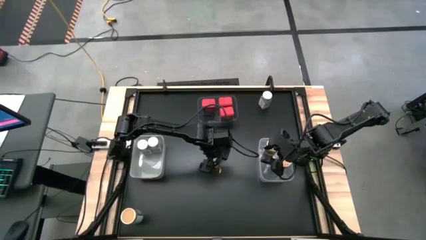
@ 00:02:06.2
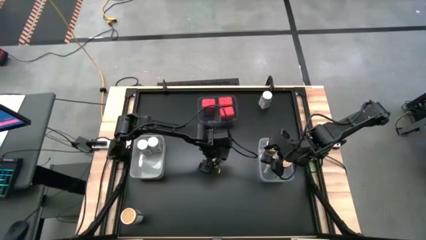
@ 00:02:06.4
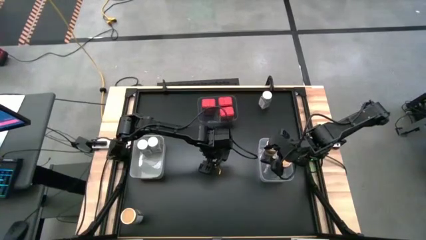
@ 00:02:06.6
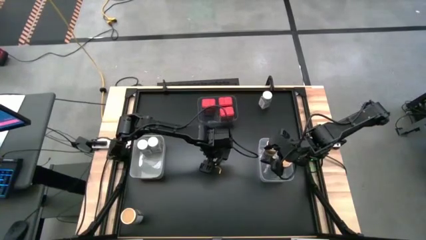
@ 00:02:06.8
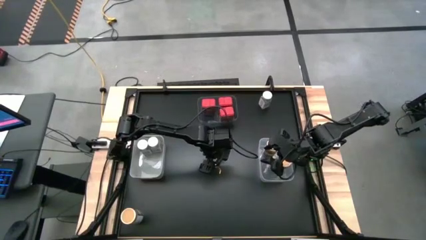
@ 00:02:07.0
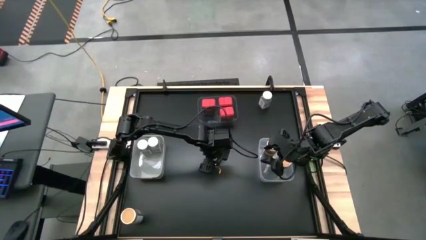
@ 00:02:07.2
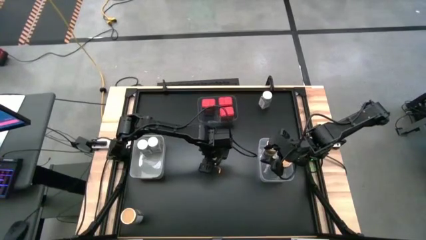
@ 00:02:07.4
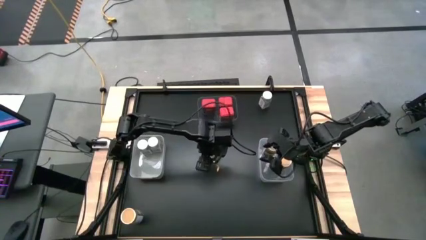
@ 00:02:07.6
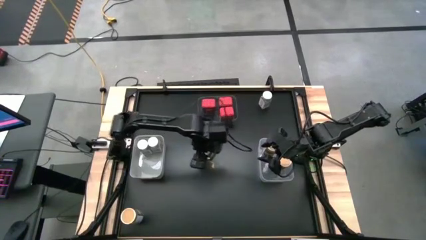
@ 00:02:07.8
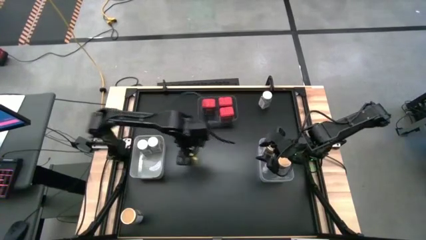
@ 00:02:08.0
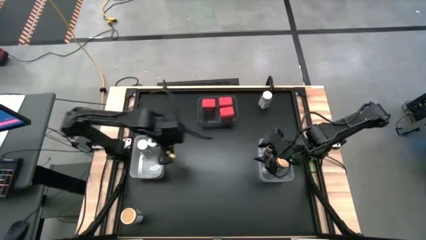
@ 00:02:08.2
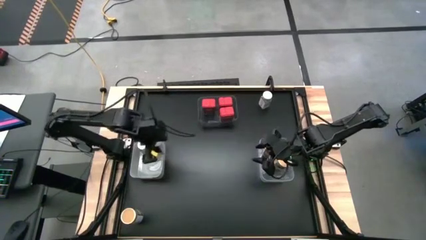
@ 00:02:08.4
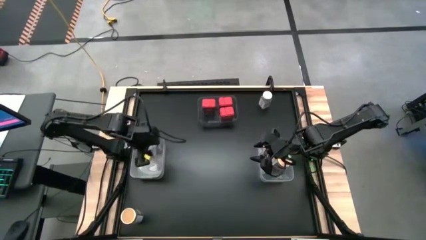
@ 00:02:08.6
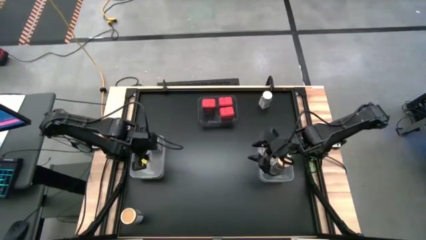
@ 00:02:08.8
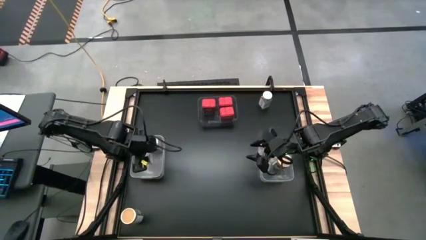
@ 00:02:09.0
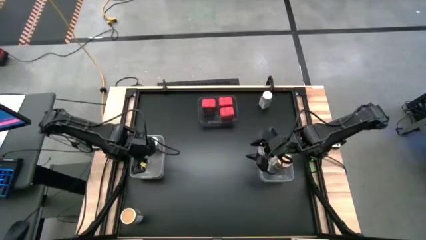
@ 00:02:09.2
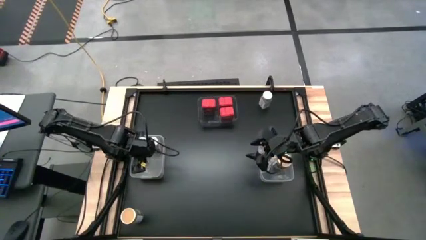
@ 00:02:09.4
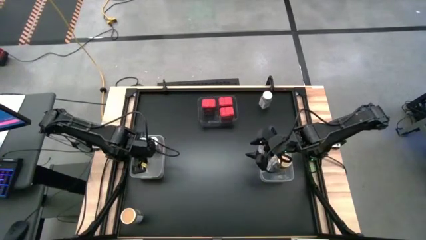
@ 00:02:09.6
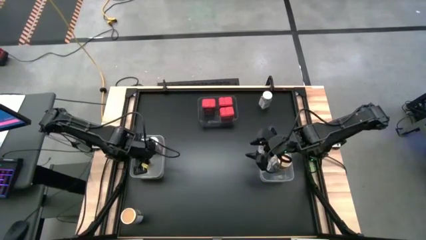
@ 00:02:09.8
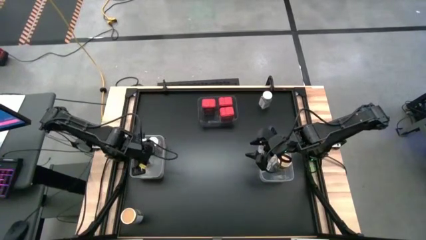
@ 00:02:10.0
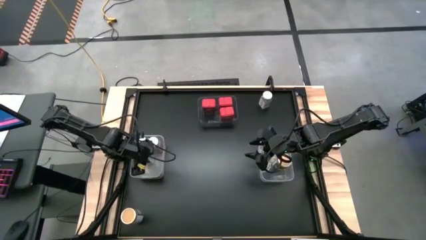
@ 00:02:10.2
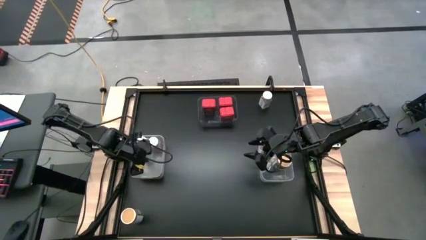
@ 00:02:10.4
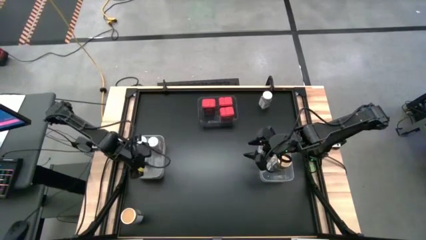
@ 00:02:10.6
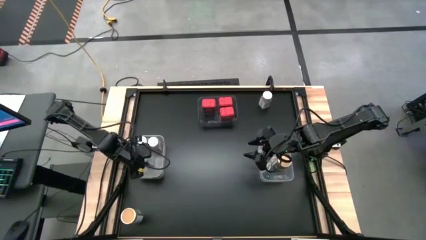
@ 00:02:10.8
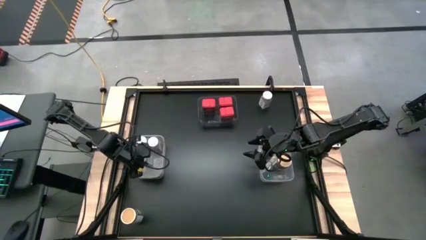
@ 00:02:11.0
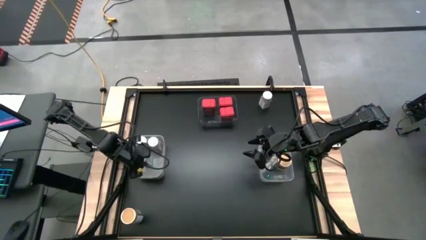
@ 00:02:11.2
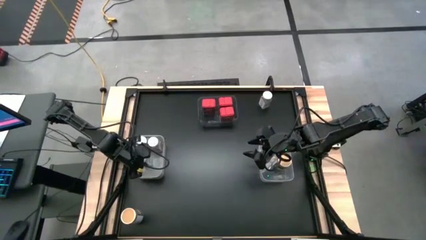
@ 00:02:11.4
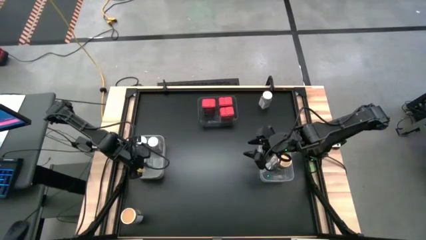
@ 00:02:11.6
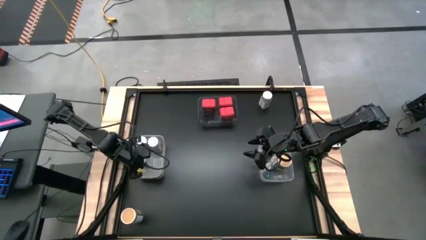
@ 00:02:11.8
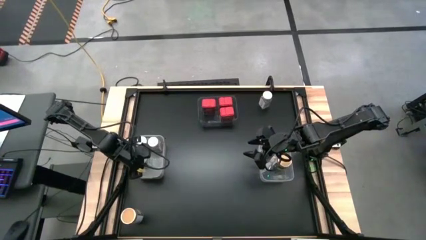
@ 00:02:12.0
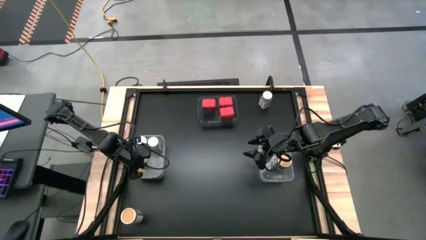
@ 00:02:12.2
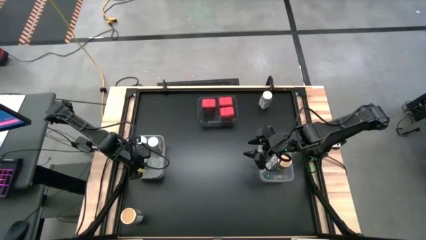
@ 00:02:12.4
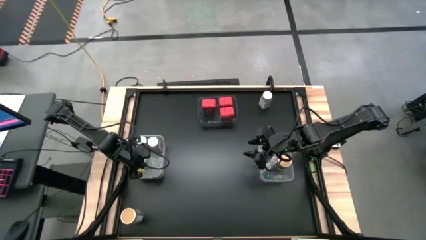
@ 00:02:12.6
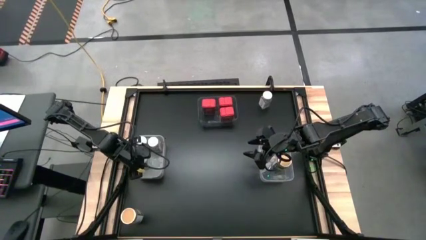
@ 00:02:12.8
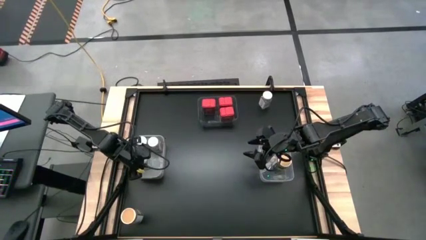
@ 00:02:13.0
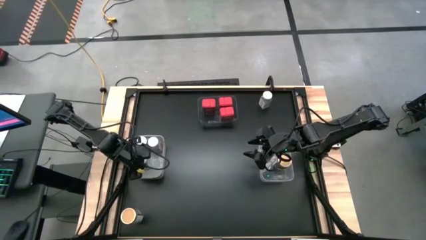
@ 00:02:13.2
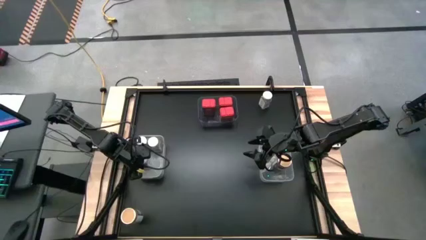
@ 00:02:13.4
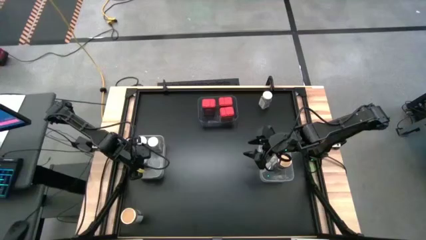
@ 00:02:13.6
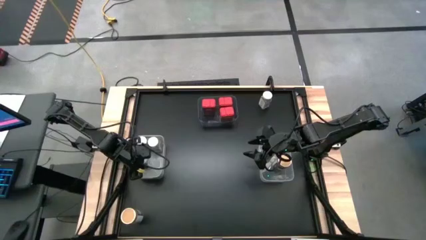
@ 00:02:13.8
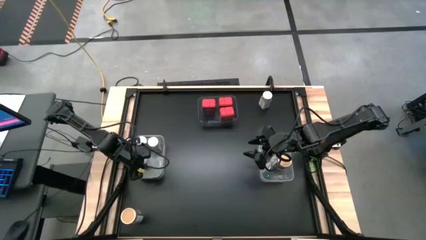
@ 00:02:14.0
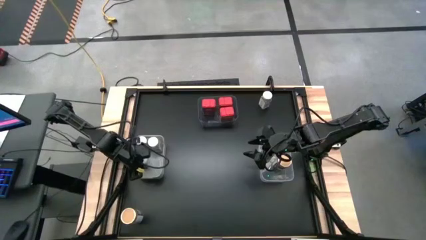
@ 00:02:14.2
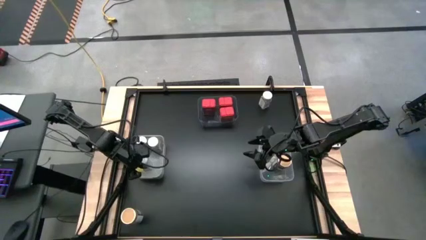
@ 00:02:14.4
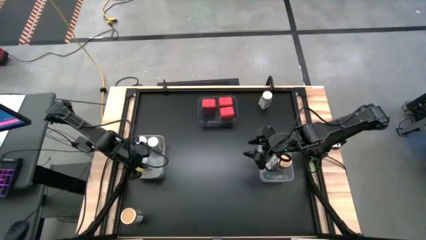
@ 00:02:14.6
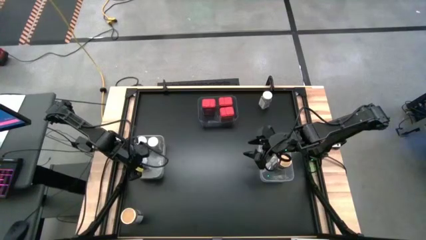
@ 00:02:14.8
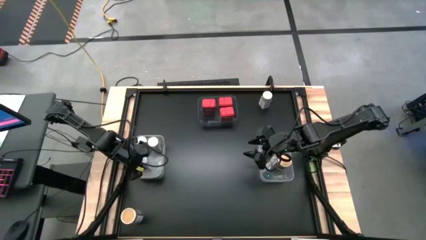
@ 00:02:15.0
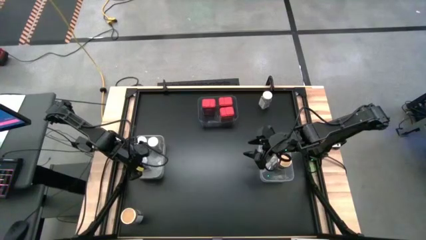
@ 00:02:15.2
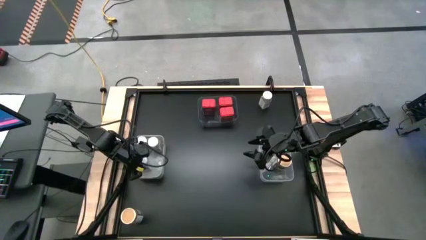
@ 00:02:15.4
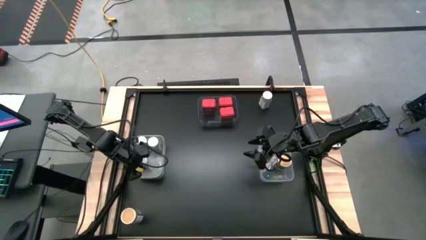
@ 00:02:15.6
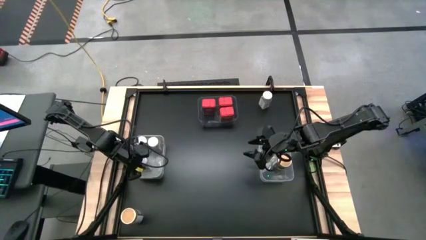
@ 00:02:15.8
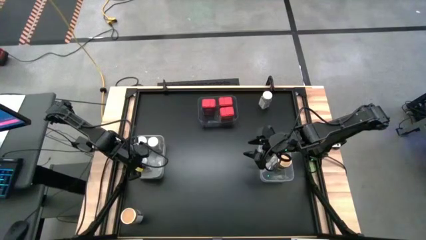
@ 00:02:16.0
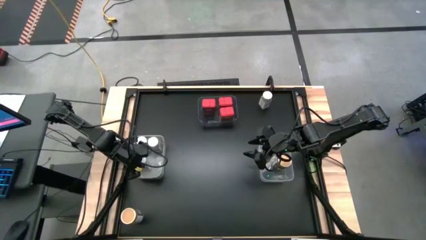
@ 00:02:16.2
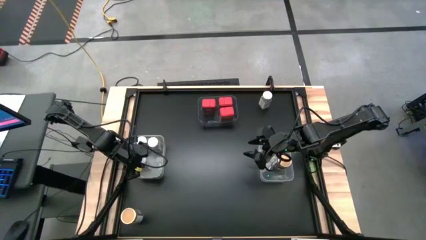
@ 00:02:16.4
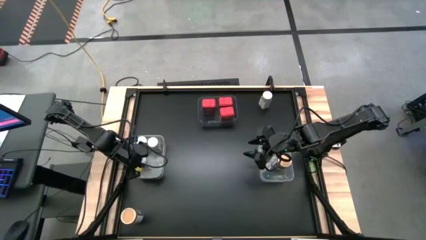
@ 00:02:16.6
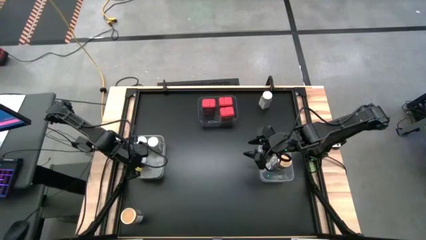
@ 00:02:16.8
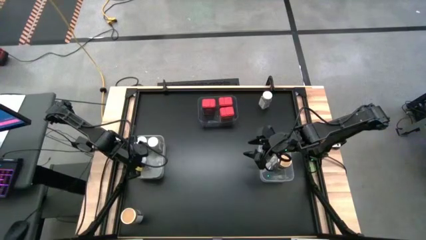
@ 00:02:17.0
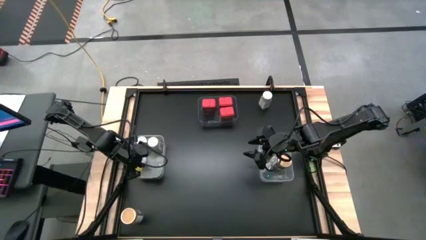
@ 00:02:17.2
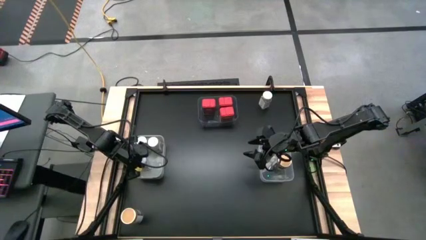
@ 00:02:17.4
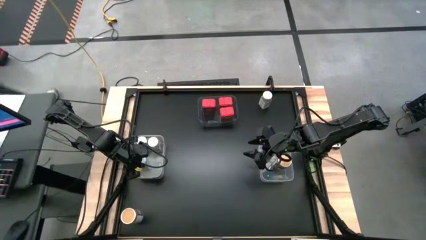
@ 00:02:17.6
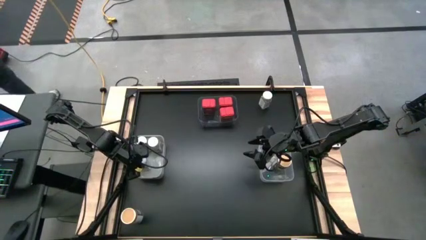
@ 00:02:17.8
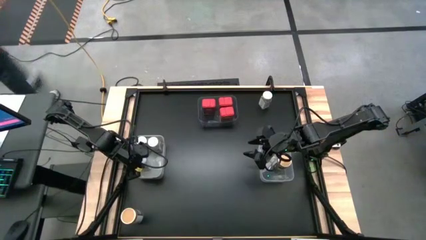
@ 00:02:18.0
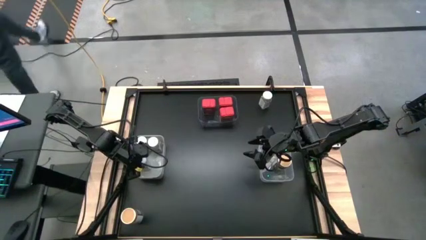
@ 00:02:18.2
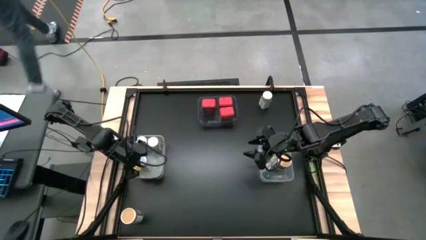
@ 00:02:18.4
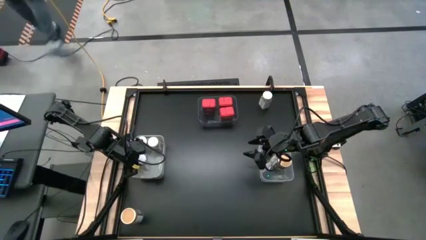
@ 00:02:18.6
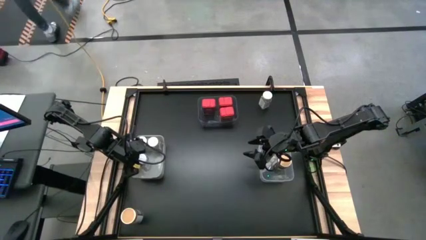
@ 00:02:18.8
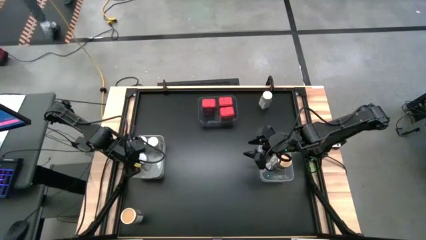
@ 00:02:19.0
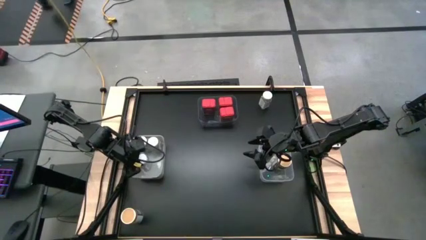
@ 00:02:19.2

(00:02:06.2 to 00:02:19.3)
Task: Sort spices by type
Put the bottom white seasoning bottle into the white bin
